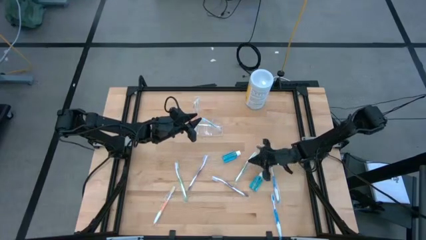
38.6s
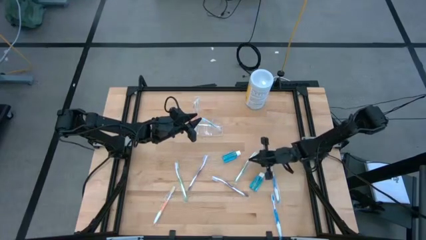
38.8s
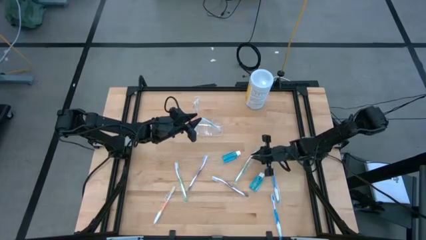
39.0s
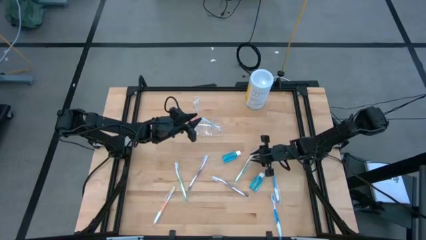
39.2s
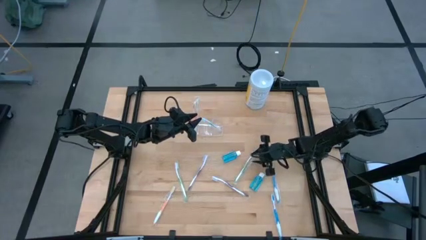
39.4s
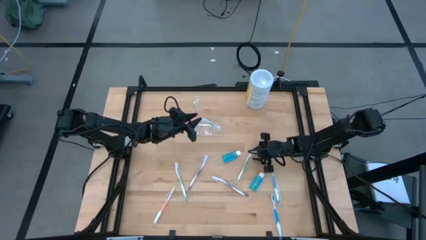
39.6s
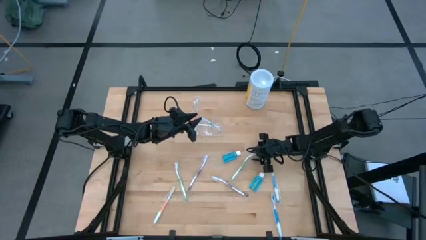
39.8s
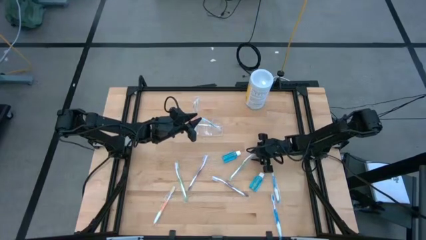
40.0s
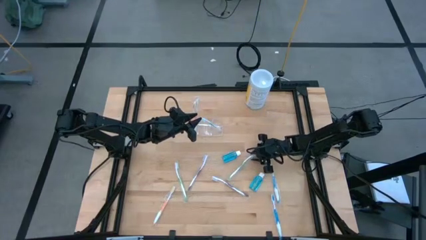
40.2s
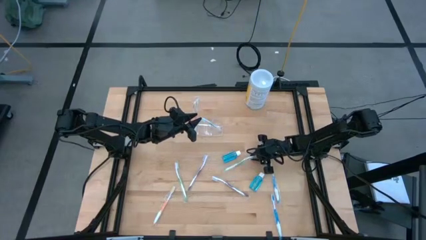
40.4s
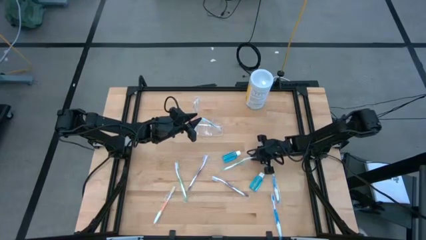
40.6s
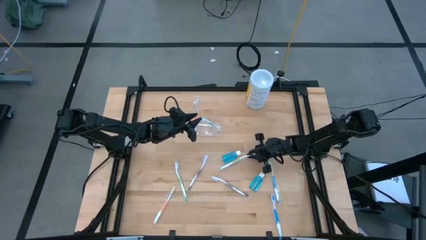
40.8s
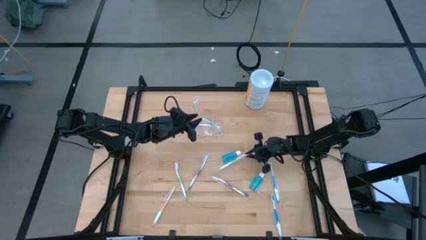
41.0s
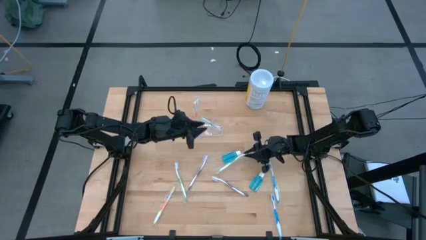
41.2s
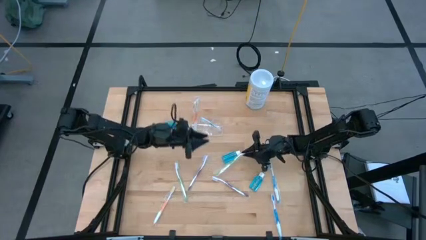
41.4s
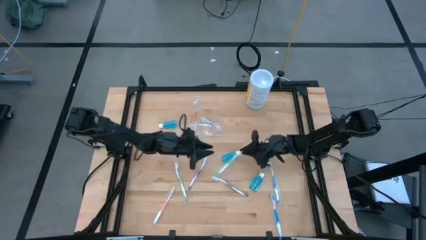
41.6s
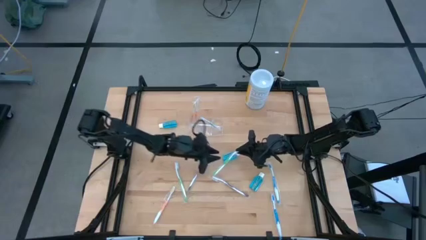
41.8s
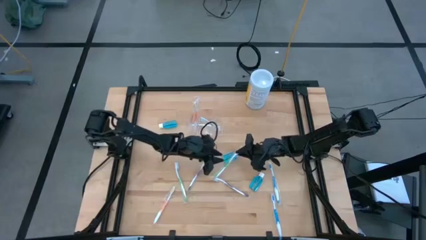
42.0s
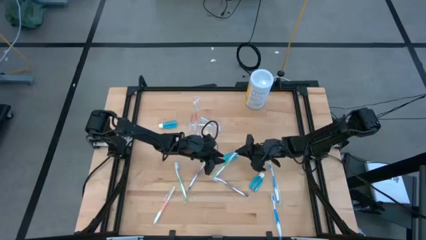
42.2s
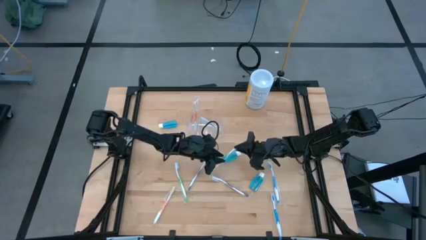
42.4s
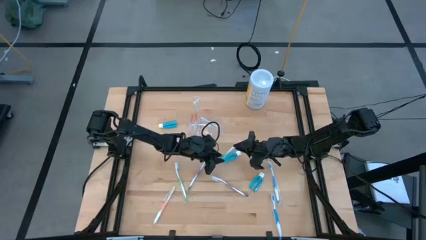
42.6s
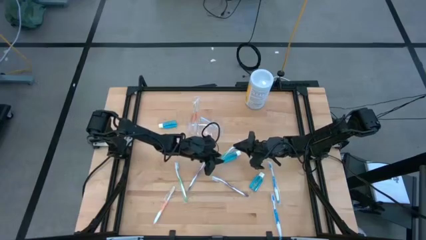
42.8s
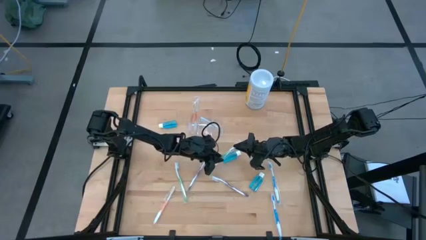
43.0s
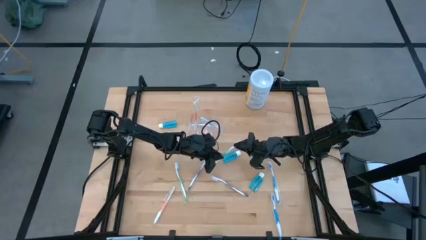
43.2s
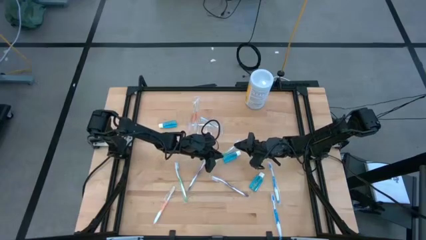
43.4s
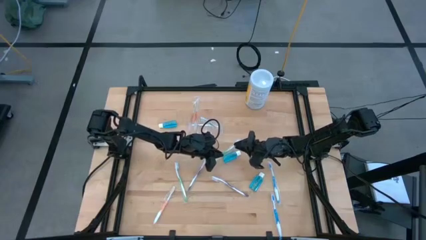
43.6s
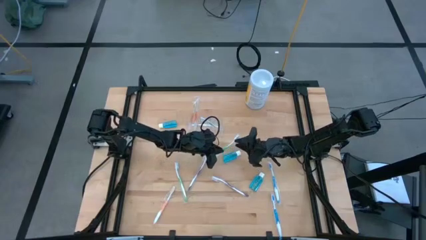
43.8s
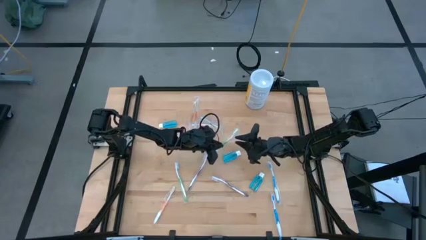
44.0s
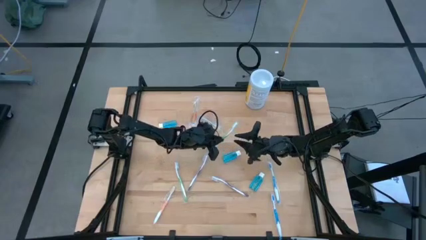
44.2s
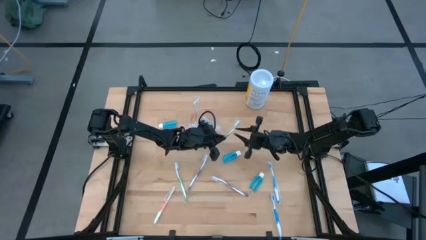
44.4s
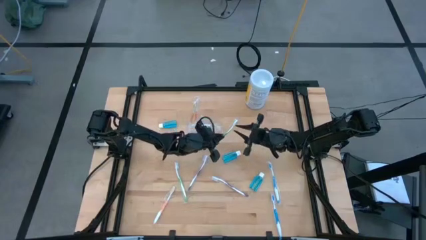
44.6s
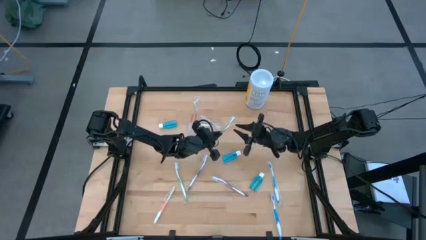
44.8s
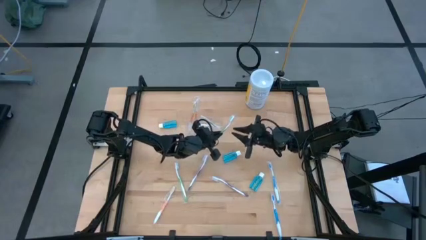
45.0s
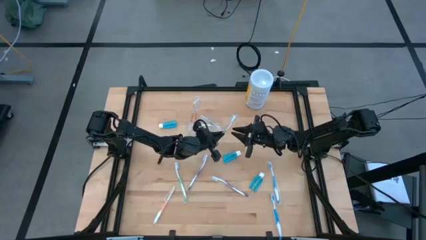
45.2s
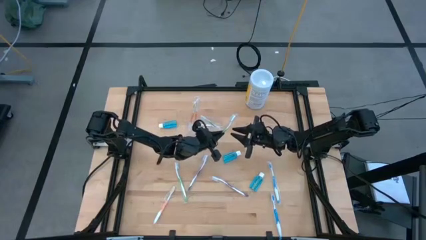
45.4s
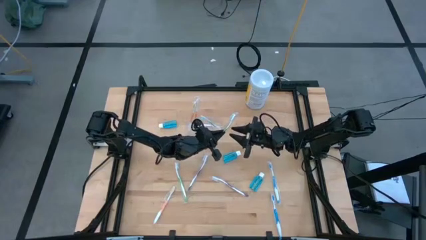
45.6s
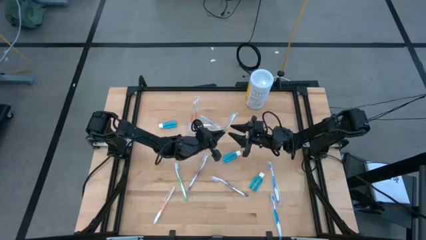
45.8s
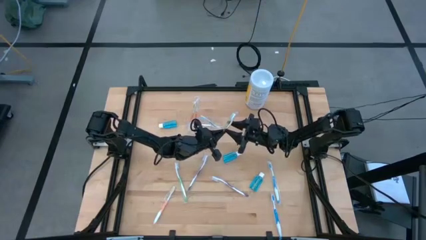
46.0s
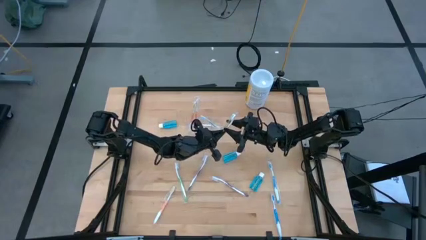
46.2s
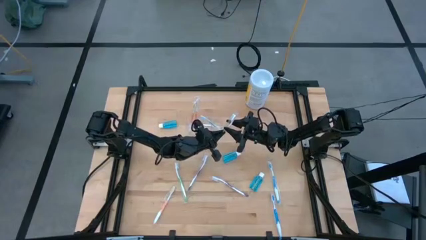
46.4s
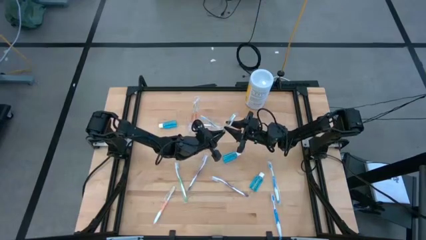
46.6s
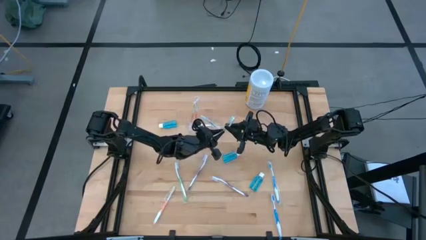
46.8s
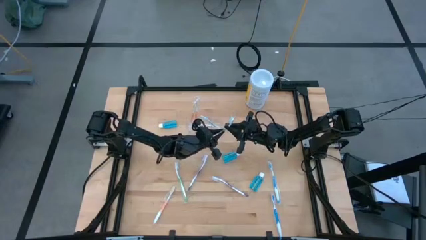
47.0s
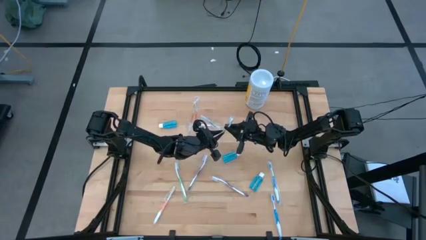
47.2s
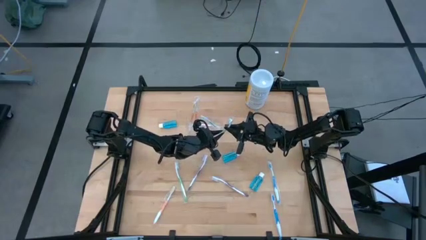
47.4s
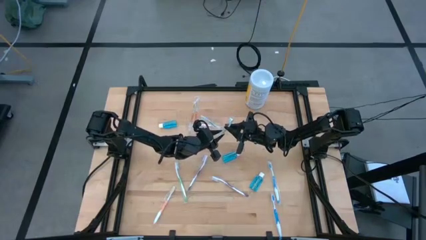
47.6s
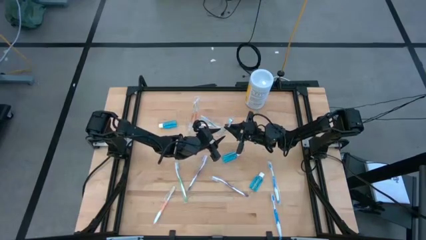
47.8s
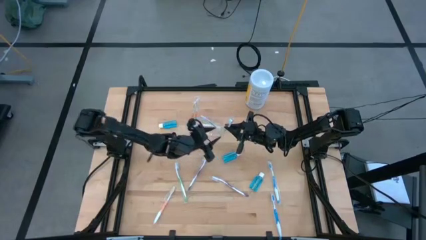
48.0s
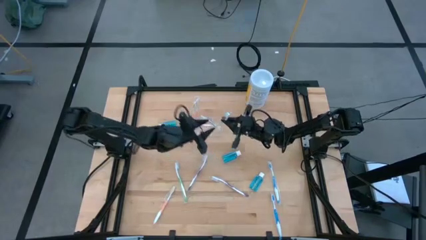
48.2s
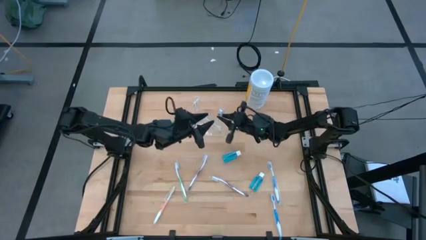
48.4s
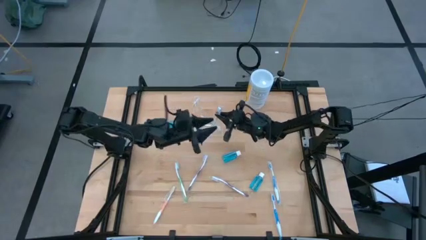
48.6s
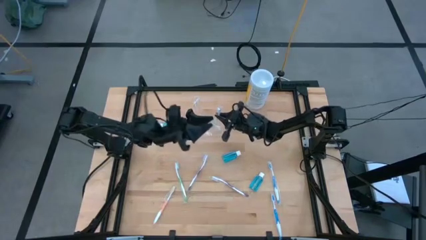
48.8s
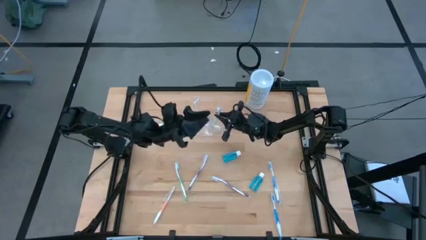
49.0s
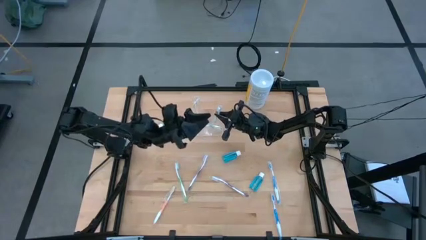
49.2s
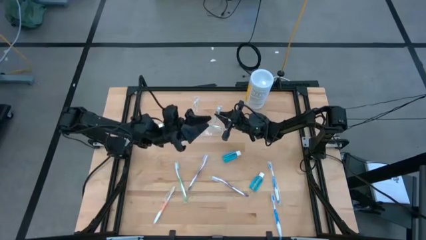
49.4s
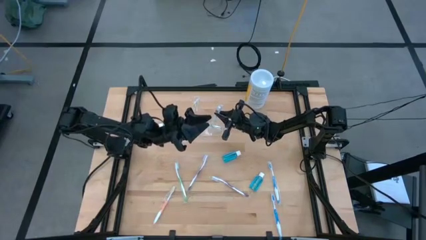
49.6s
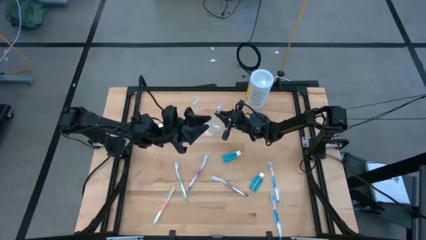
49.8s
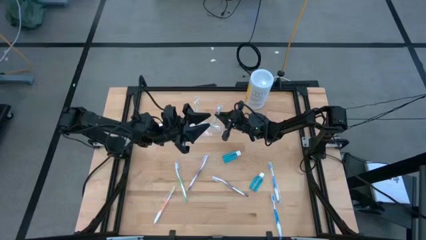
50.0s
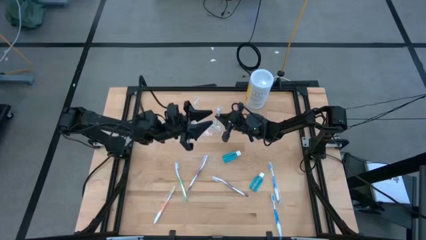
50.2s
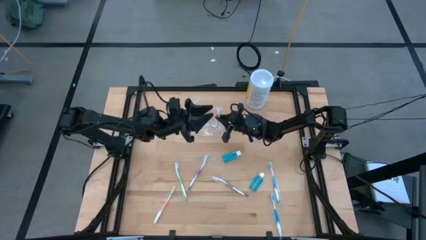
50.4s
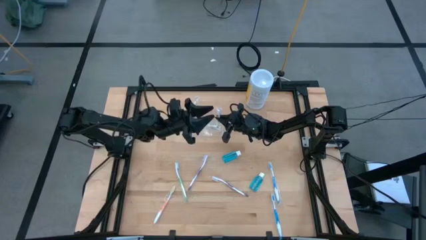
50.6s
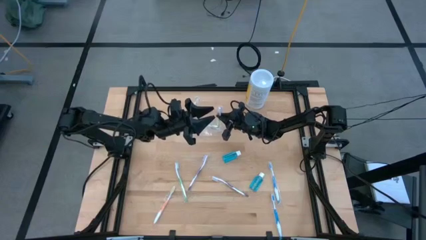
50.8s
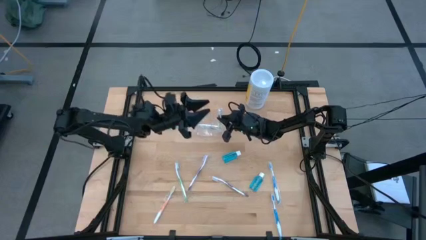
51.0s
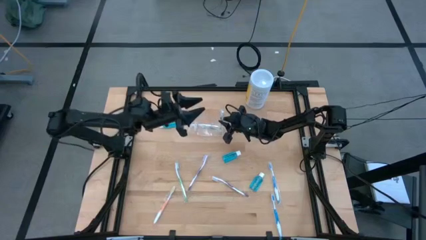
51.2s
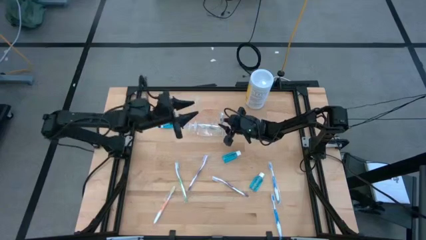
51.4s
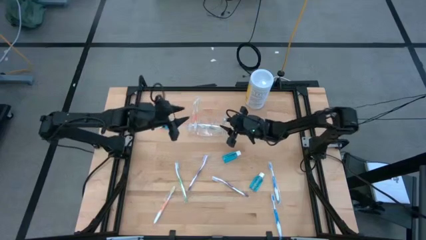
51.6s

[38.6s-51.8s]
Task: Pick & Place toothbrushing station
Put the right green toothbrush into the transparent organizer
